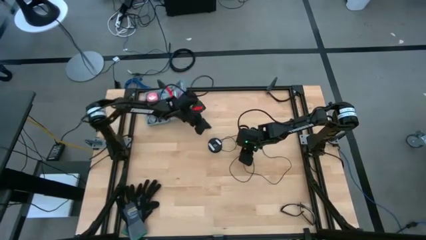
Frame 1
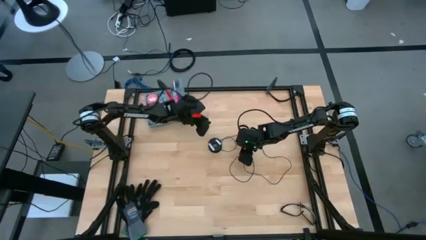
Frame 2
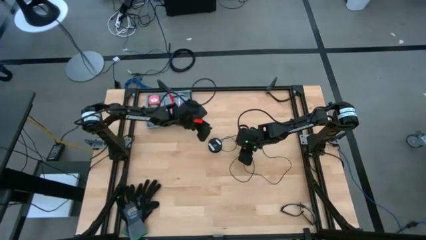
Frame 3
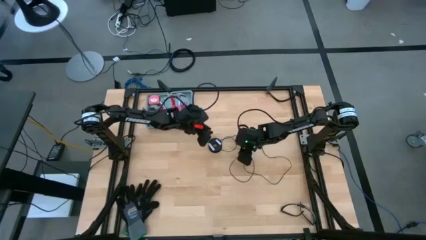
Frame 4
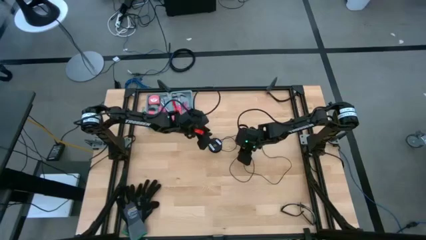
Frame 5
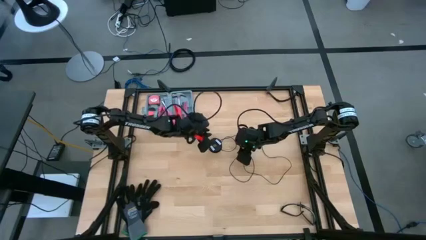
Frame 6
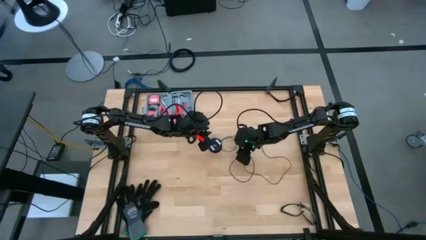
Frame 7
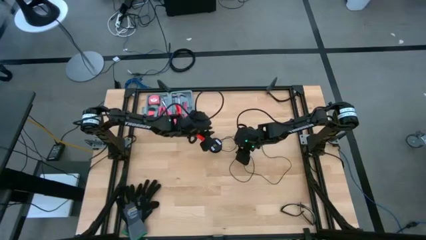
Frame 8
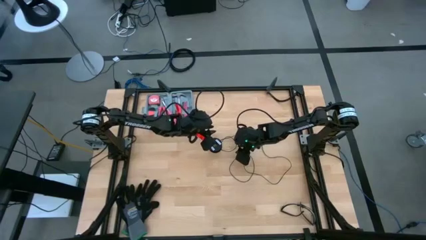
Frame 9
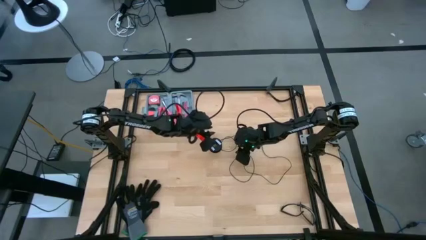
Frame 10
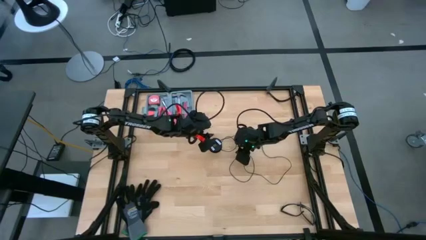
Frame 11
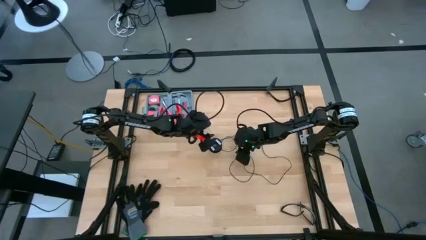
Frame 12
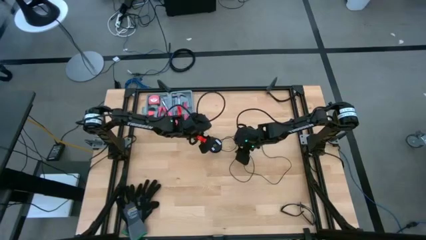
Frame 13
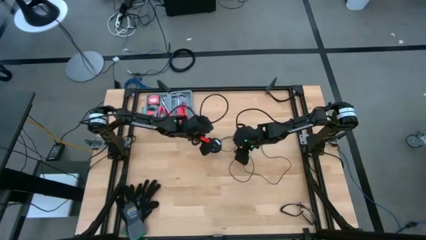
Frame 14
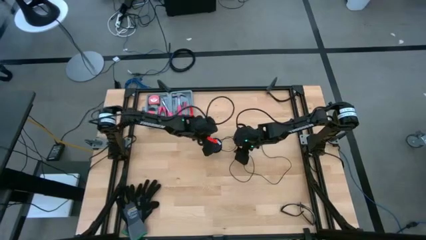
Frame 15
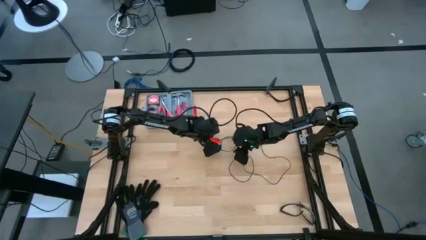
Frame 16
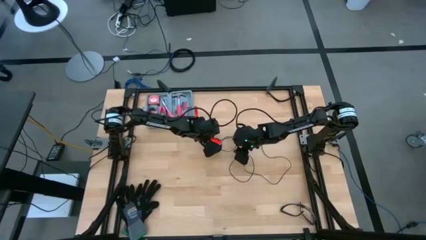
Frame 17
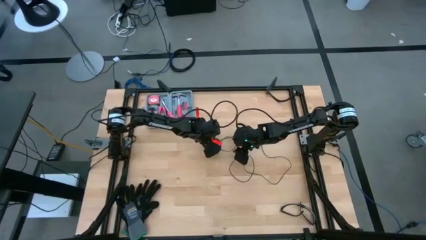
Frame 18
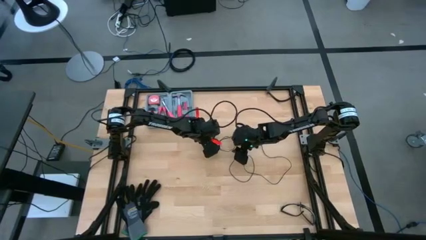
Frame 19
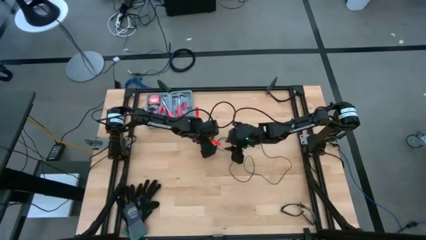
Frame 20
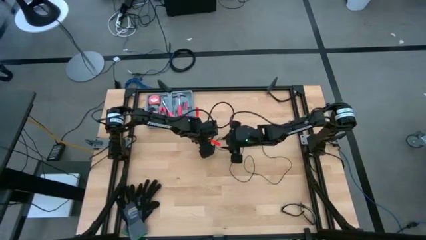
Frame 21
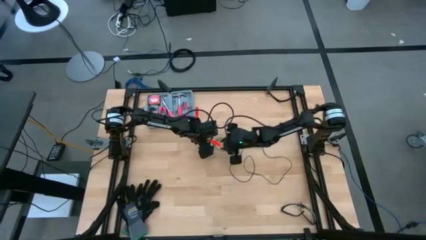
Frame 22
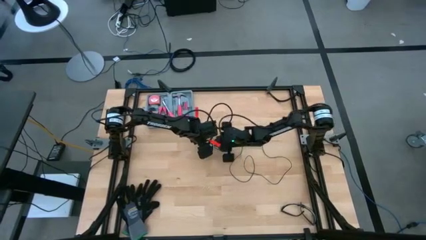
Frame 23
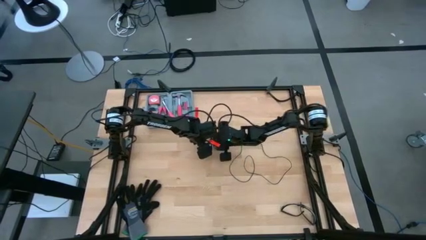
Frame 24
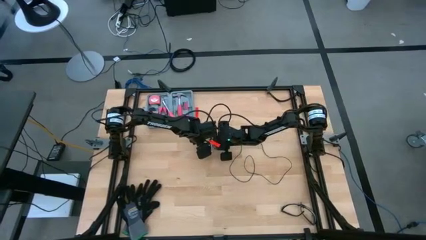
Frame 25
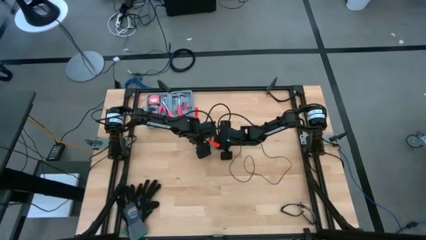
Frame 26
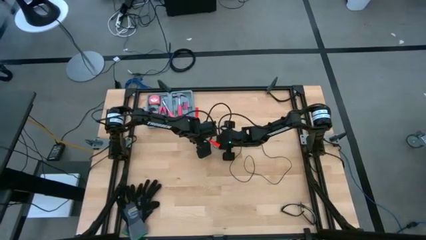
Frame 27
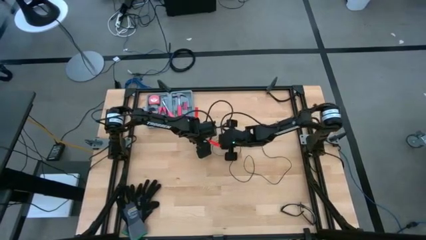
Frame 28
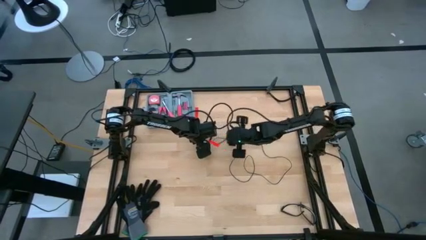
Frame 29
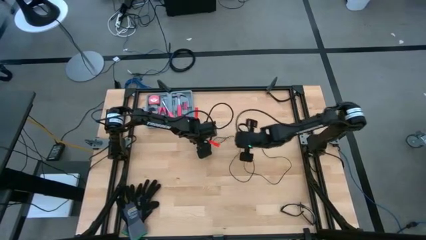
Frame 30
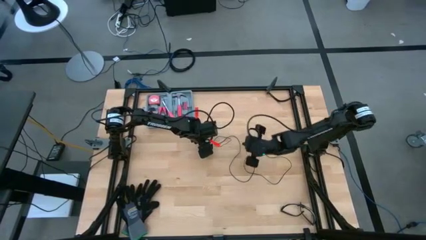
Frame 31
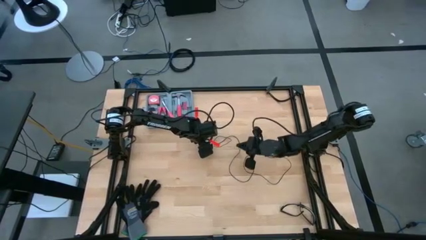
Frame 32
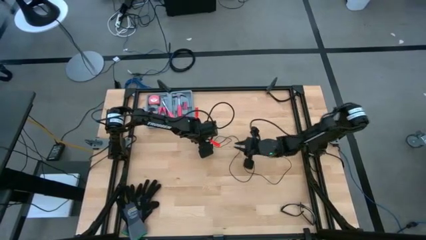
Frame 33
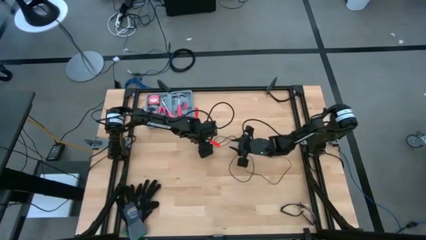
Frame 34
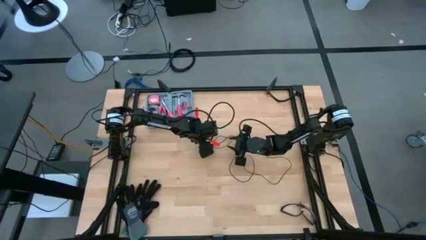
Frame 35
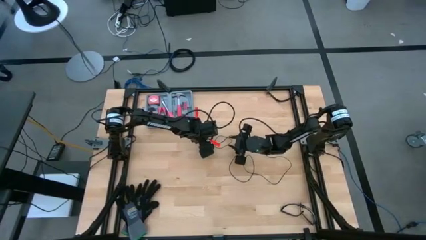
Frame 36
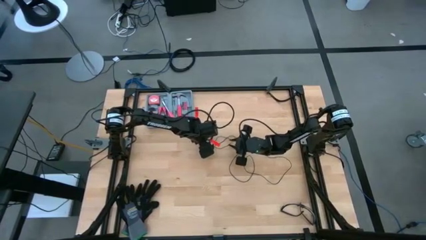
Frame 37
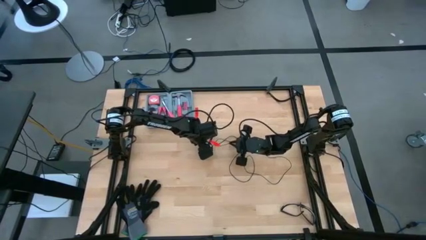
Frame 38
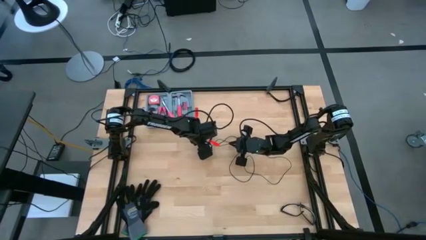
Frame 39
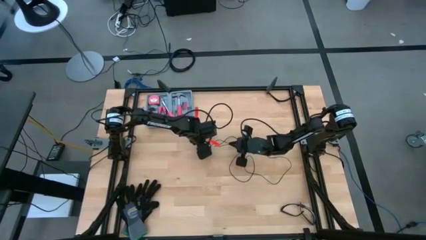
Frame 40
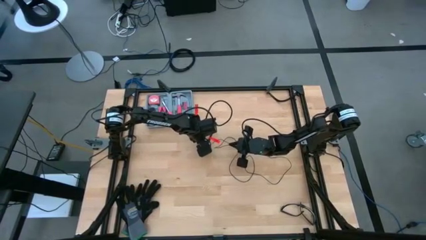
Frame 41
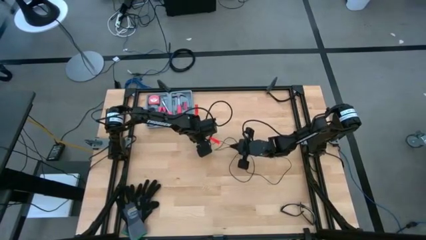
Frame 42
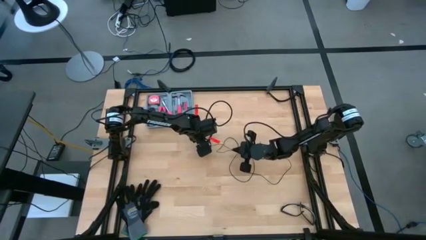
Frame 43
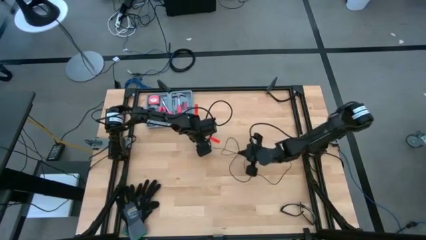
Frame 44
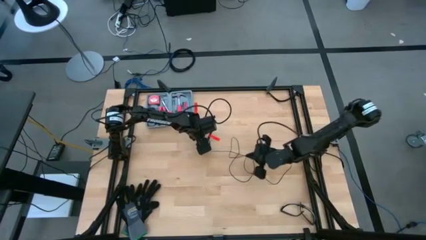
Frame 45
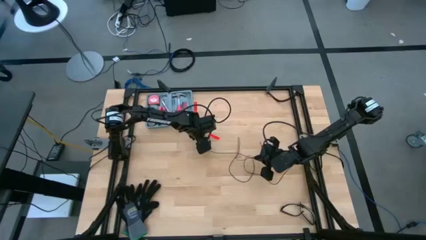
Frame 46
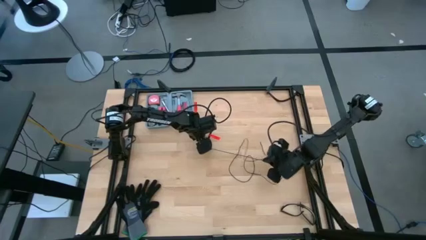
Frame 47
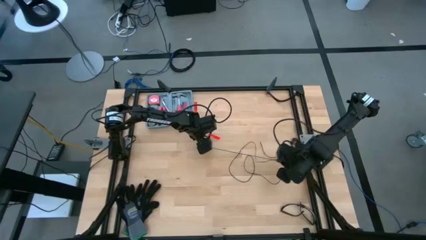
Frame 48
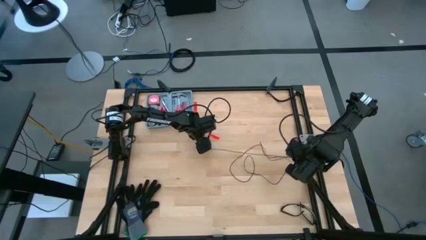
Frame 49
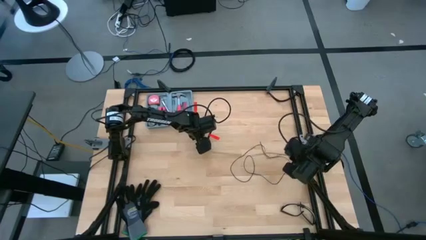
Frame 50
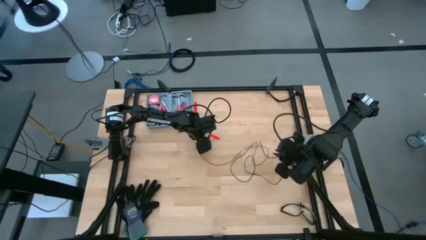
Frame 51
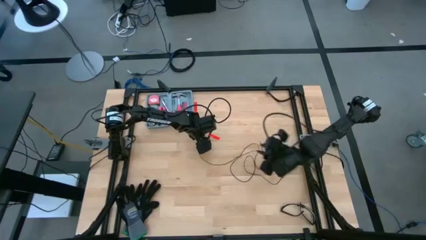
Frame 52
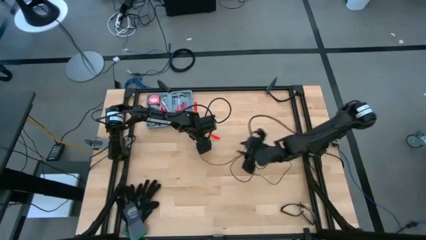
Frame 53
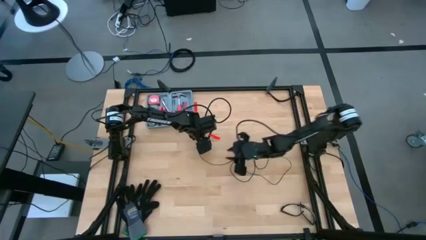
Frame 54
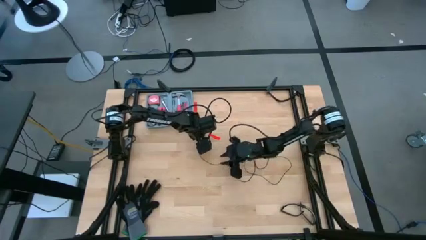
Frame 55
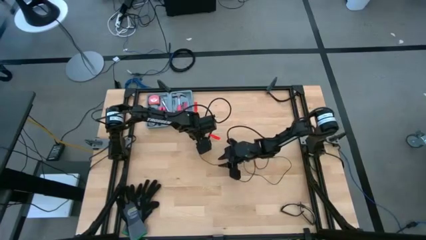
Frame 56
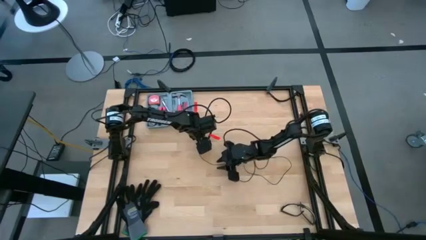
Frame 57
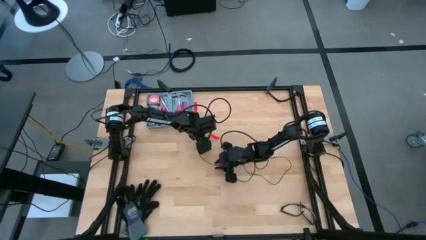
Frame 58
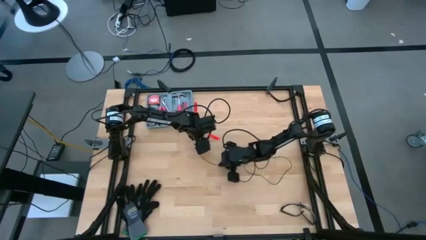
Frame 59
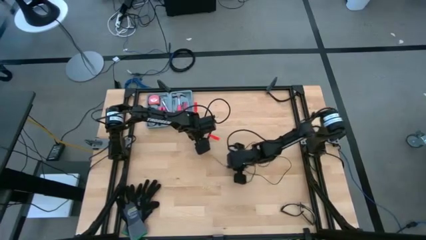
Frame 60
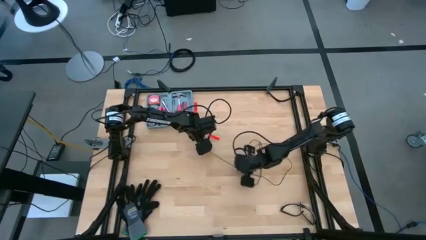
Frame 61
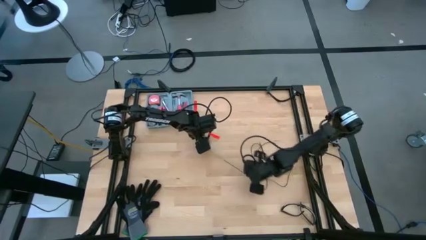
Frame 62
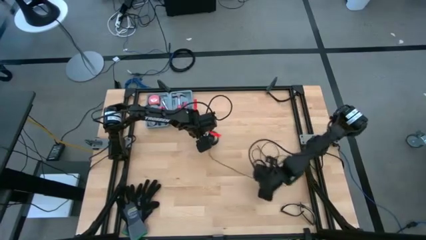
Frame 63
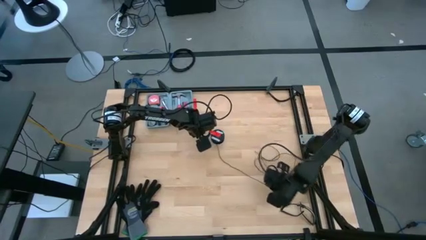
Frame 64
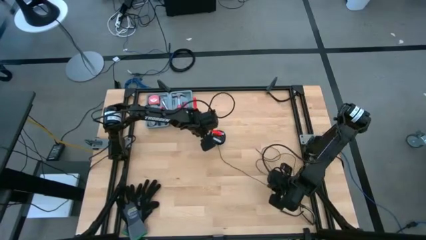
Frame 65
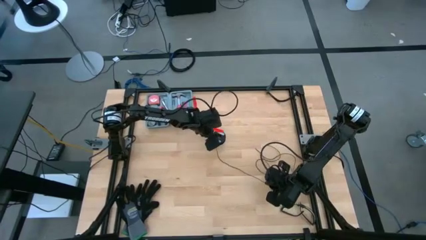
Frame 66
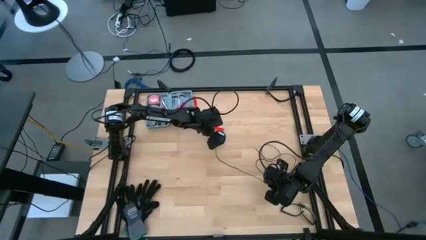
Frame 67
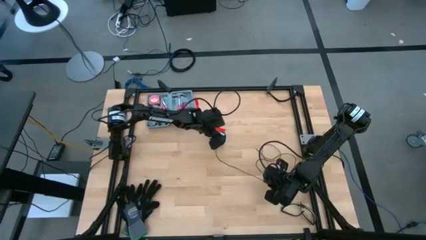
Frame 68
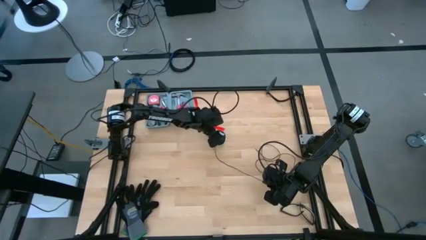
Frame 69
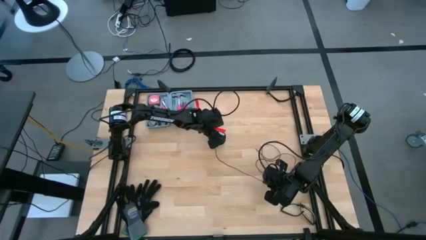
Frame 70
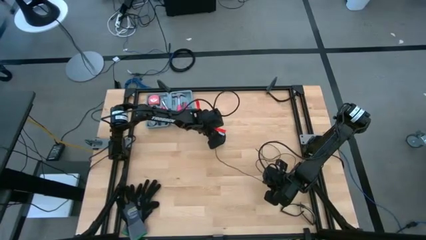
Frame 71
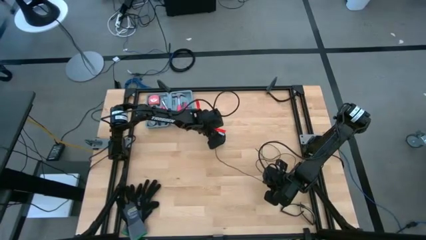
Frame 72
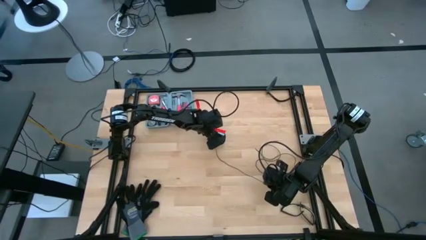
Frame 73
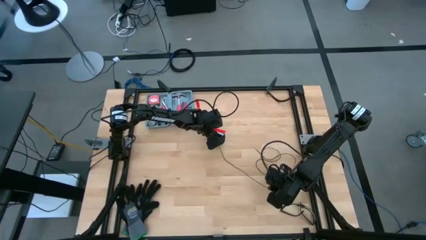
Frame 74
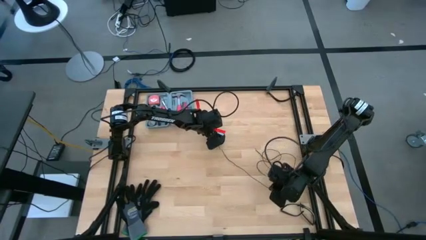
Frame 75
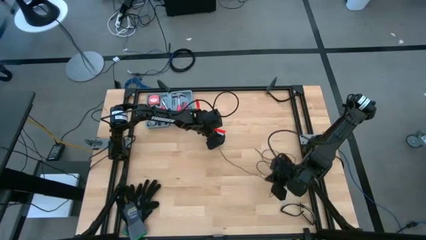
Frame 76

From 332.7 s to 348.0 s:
Task: Coil cords
Uncoil the black wire from the spool
